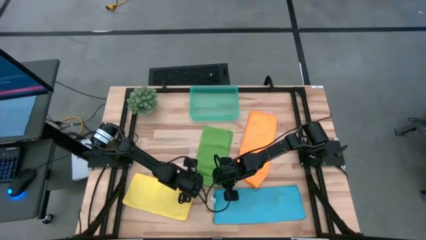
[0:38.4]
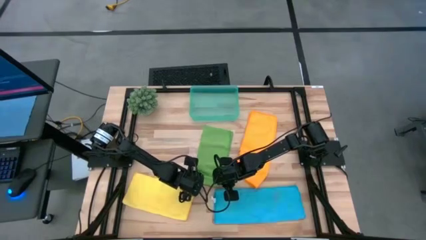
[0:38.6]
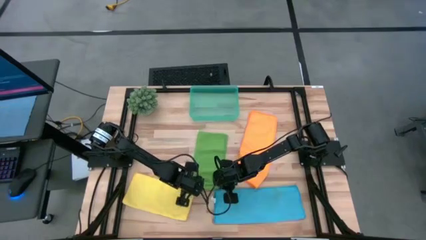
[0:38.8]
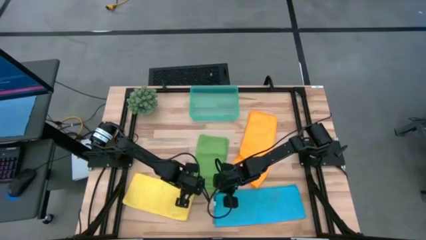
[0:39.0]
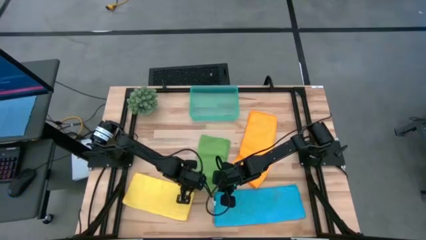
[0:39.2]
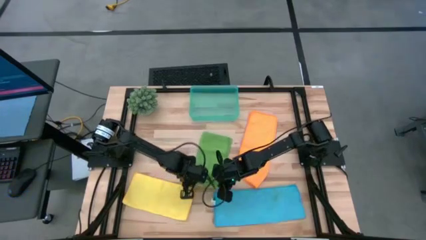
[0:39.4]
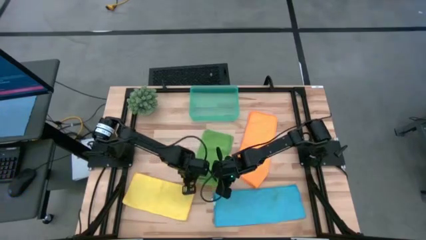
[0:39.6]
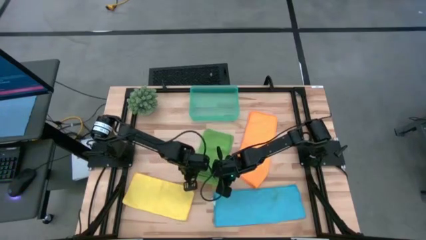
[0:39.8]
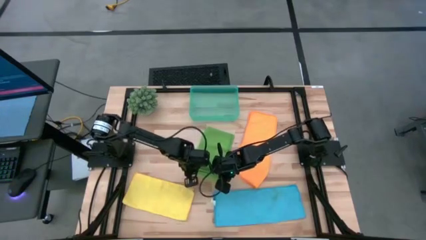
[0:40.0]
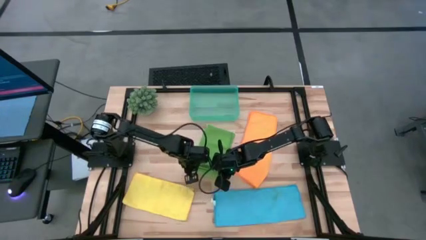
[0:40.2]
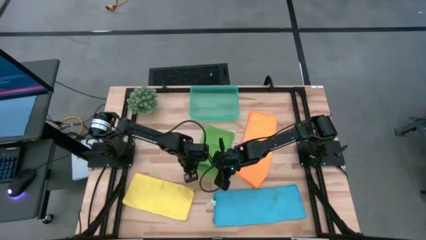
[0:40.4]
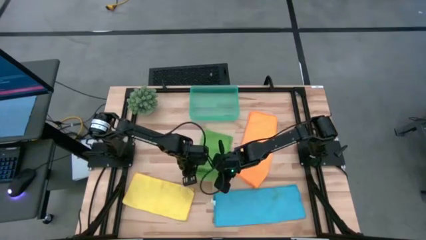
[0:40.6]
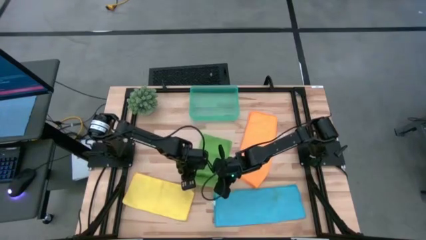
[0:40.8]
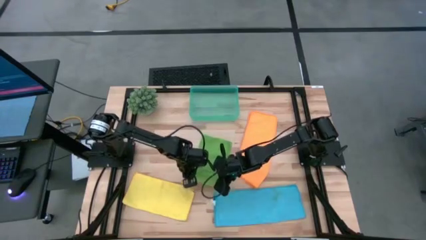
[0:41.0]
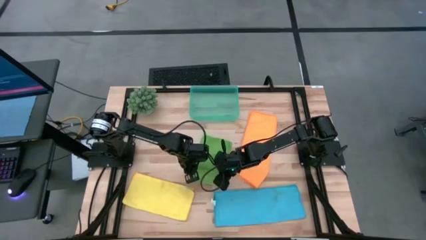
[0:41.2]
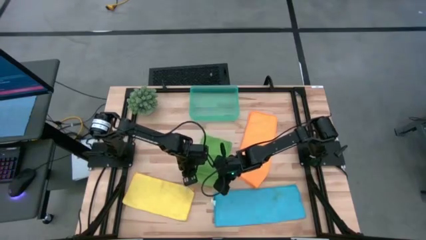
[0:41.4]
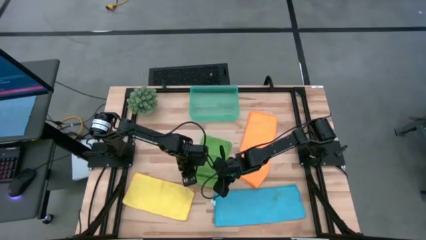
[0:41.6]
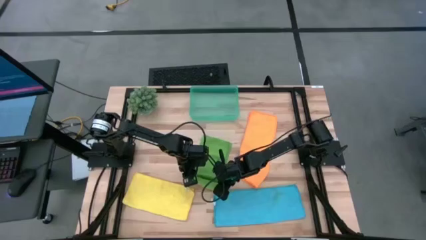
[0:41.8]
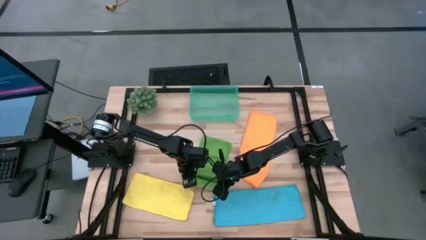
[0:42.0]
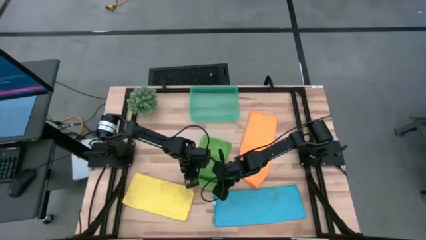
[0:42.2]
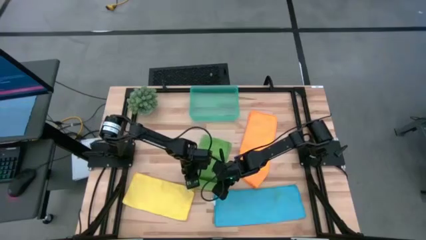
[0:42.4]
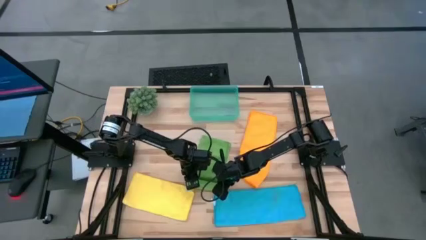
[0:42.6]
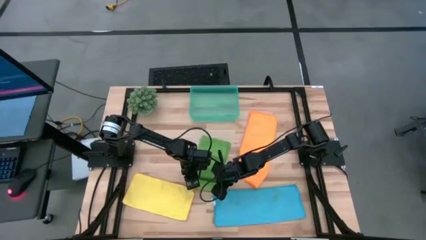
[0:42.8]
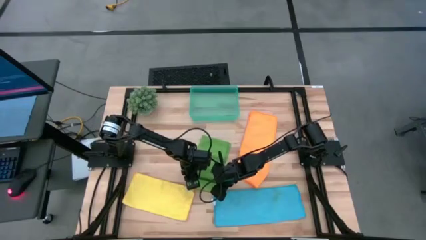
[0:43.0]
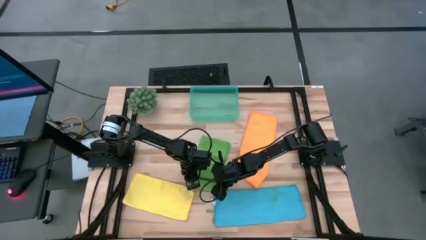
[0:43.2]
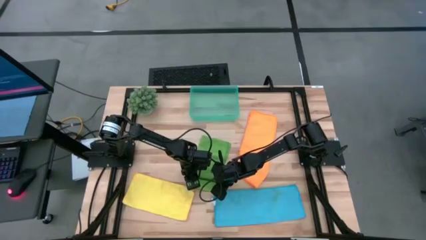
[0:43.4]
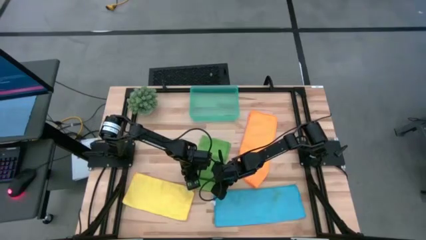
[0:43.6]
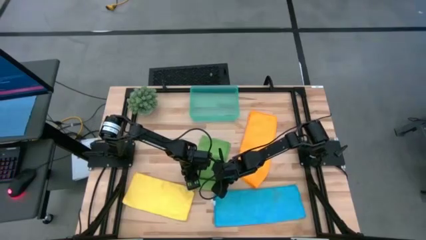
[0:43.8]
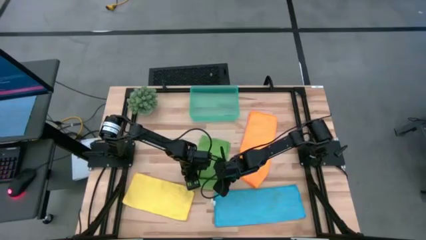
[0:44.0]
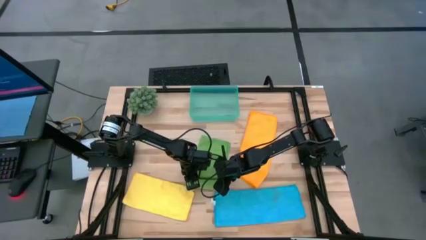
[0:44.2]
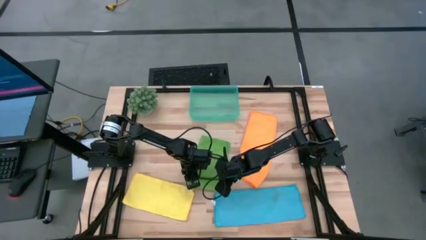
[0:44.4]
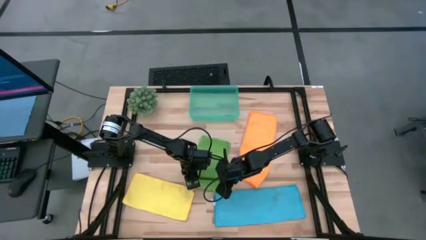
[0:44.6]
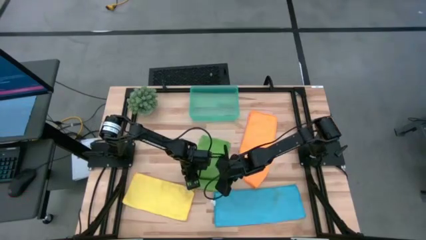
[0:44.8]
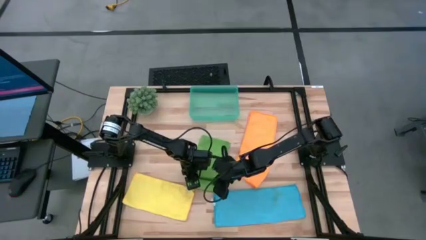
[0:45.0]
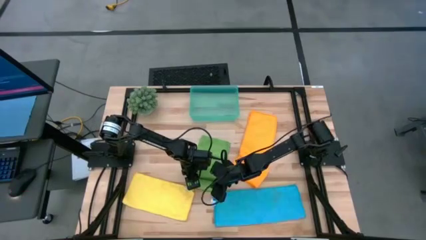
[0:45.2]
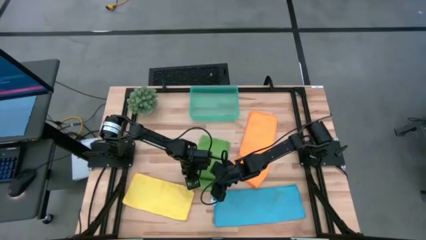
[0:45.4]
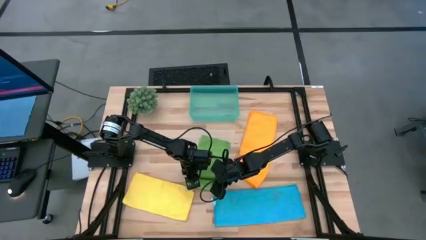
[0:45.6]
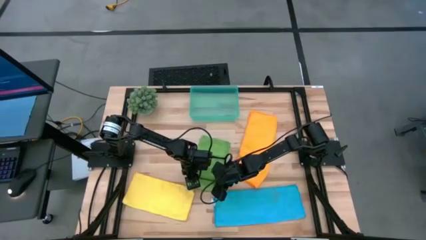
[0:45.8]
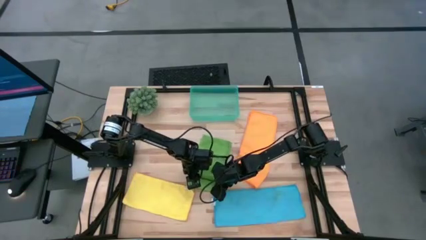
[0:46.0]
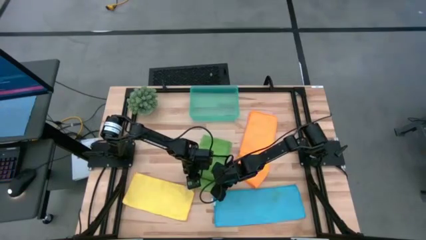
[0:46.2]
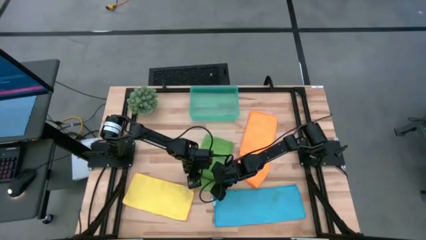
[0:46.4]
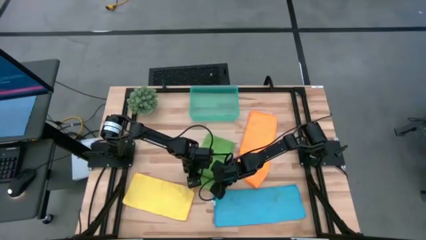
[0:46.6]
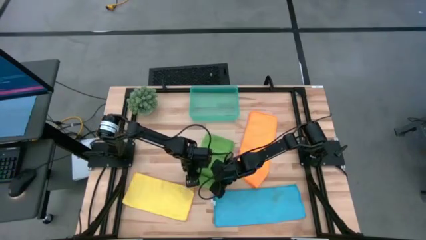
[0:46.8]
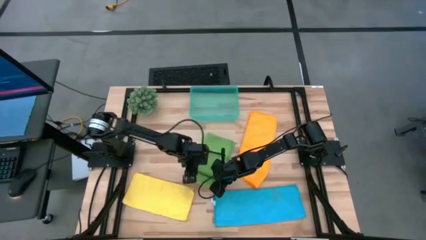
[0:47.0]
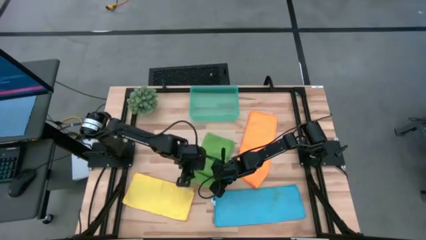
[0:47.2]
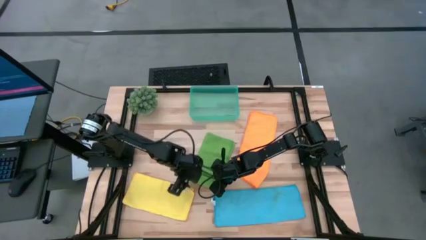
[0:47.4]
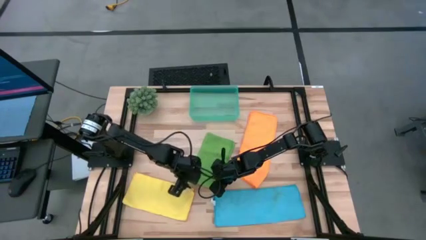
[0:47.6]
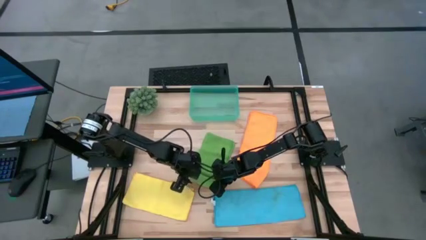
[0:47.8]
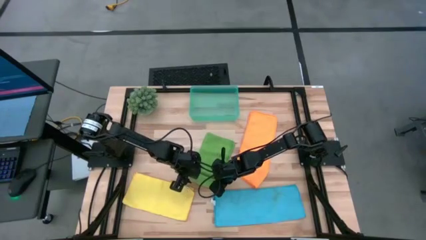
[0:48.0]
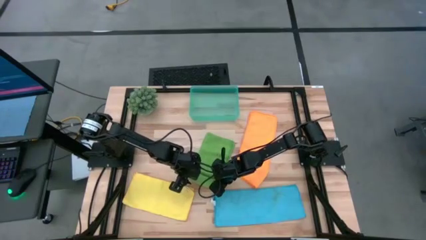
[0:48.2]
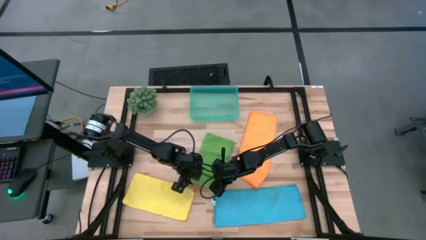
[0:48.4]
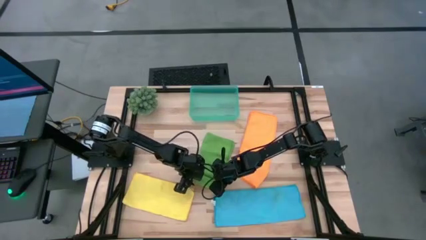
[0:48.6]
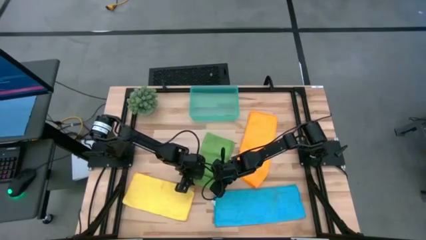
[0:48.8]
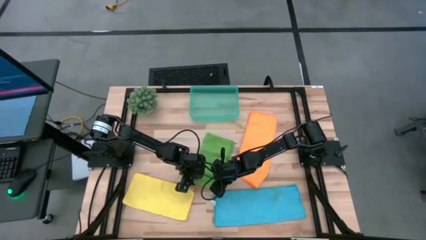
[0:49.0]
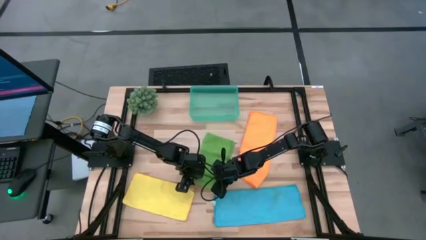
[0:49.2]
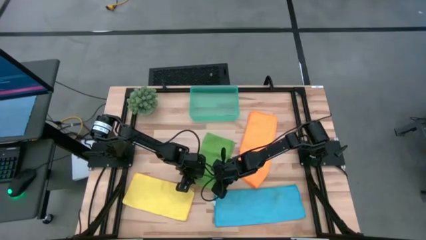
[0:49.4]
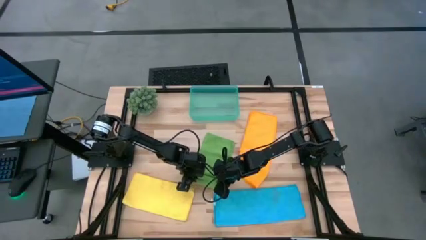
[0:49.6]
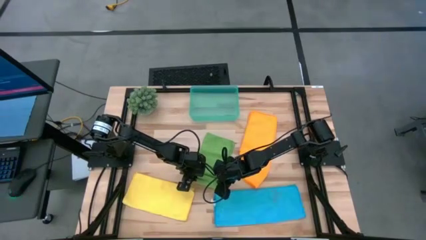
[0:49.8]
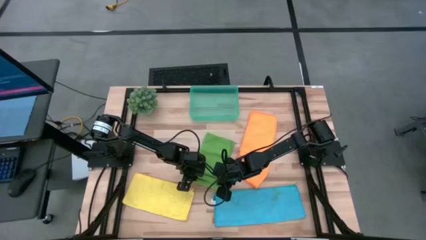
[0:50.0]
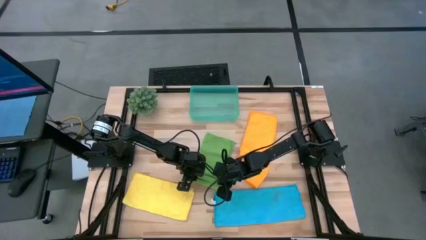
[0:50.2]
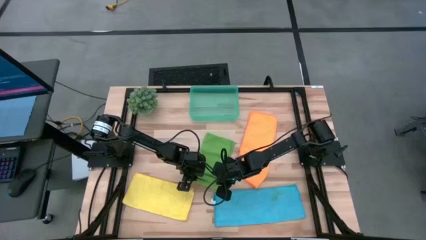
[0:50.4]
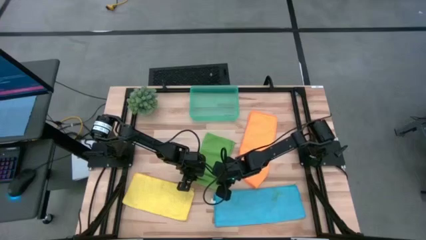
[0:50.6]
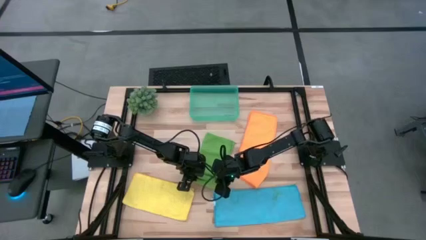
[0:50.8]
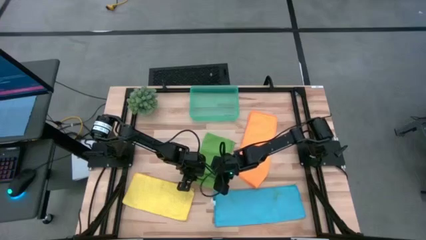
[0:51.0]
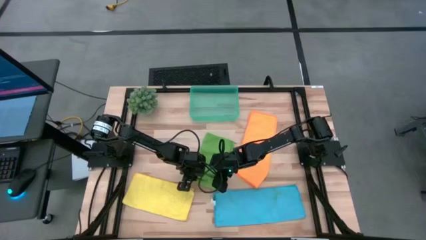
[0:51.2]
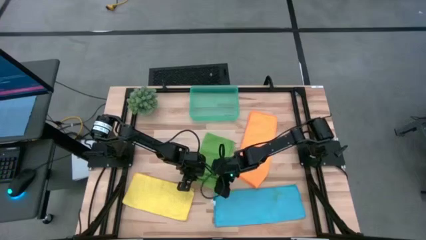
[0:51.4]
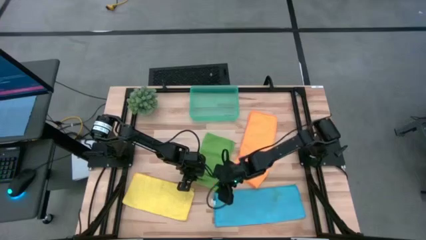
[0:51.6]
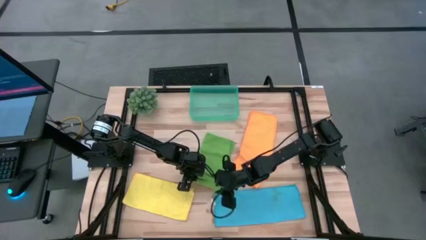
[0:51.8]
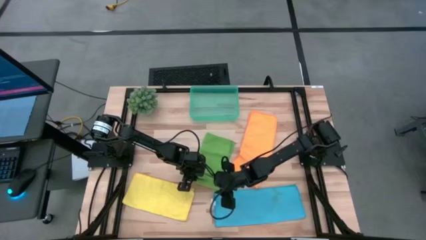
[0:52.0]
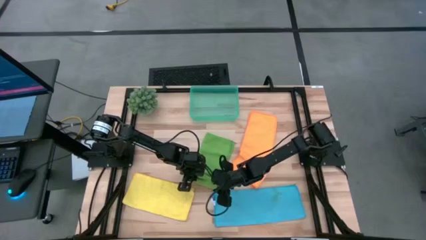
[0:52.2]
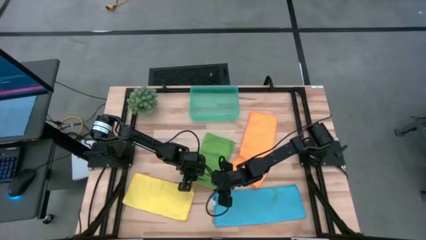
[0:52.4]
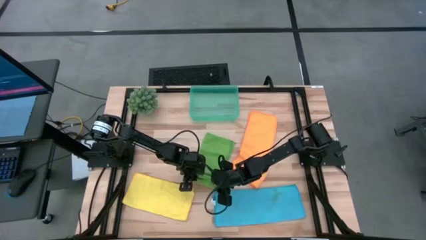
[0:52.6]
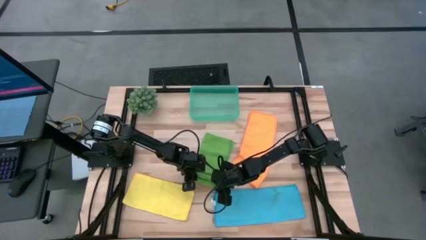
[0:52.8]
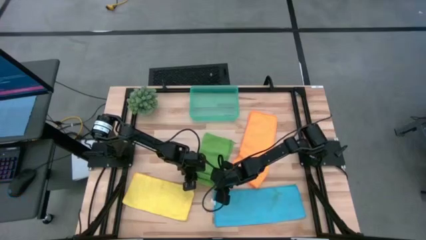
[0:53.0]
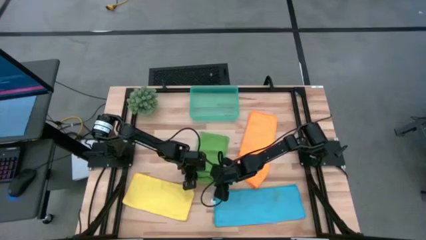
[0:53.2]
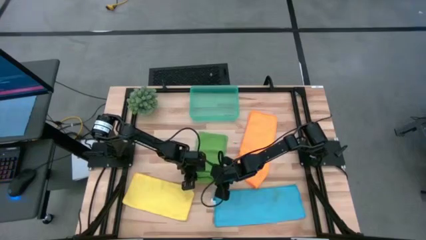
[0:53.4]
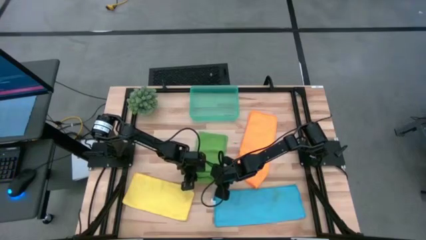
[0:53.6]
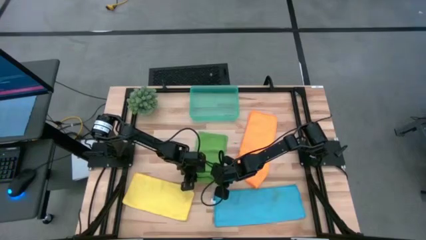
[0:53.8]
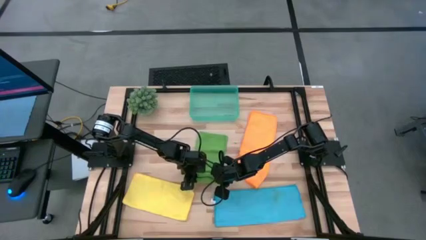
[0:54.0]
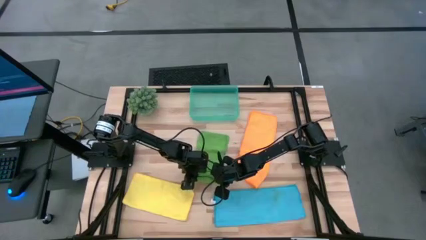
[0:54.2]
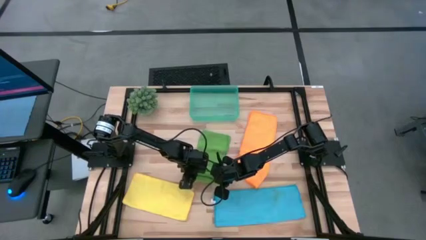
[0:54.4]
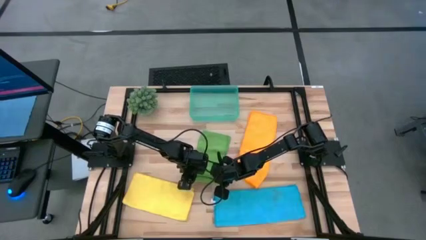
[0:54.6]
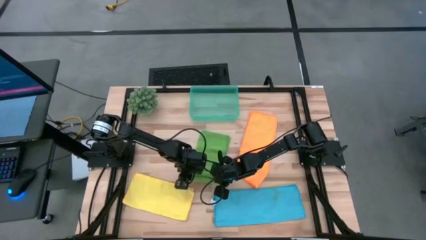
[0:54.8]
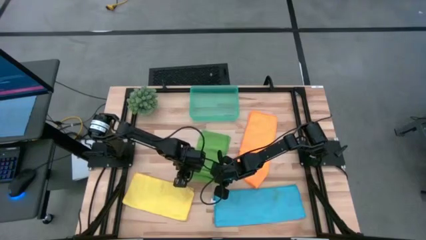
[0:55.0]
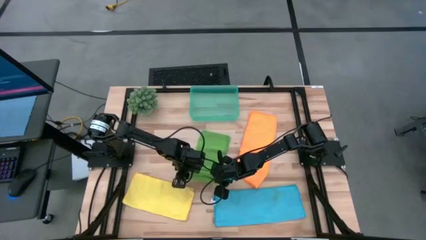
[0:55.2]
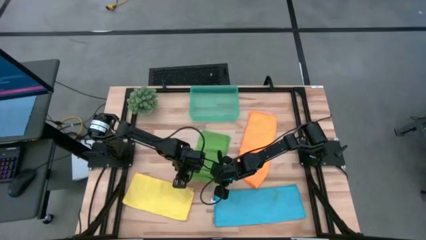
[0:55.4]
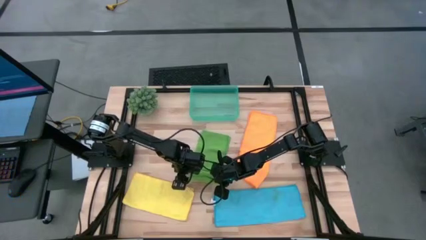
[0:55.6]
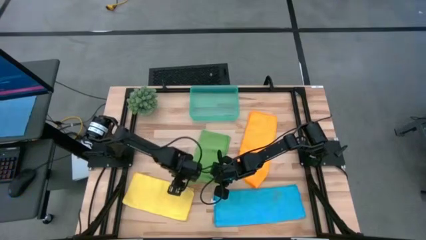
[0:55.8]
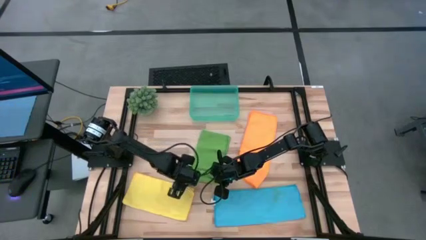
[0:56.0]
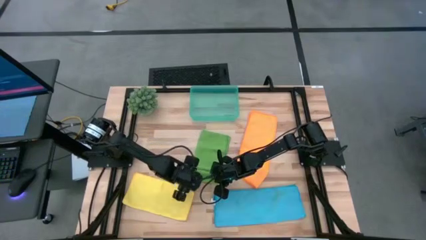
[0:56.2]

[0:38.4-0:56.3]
Task: Roll microfiber towels into tight, uniform cylinder then place into a basket
Roll the green towel
